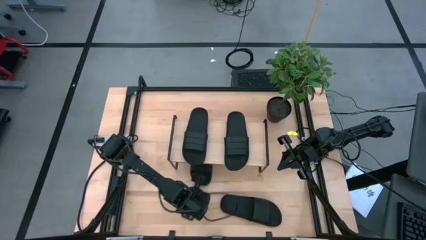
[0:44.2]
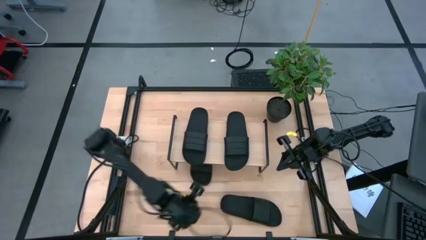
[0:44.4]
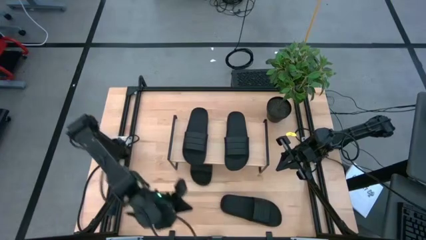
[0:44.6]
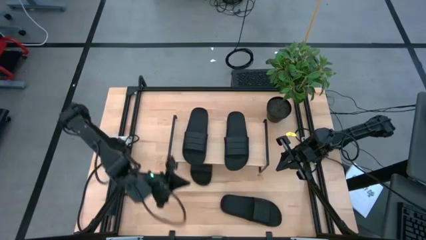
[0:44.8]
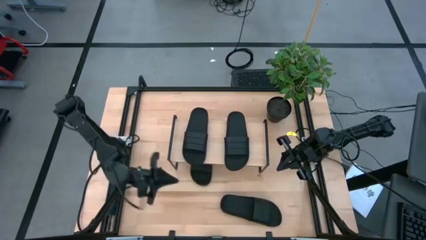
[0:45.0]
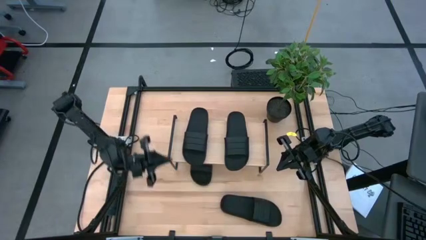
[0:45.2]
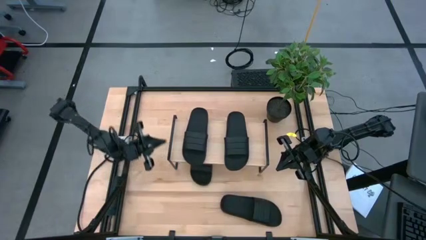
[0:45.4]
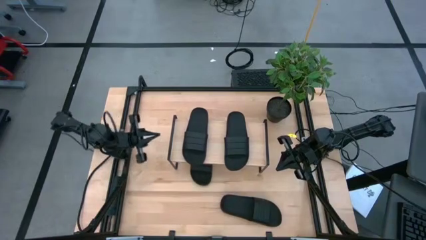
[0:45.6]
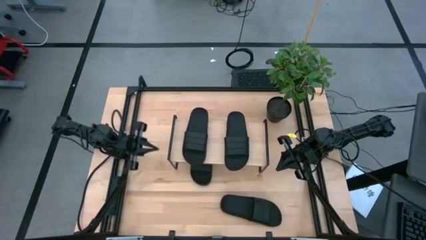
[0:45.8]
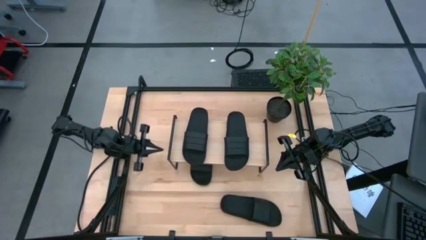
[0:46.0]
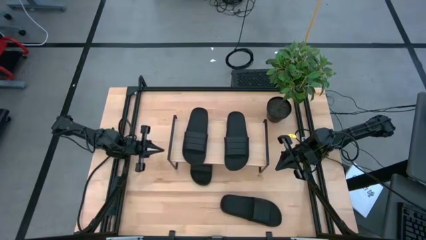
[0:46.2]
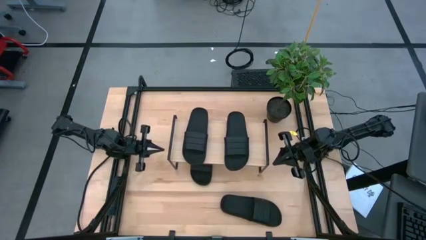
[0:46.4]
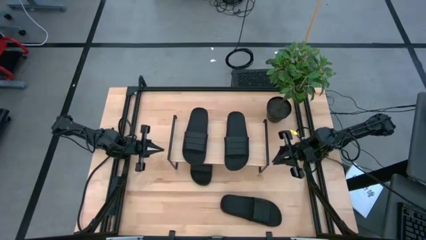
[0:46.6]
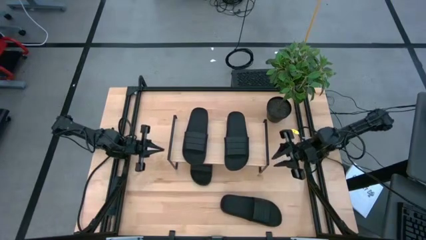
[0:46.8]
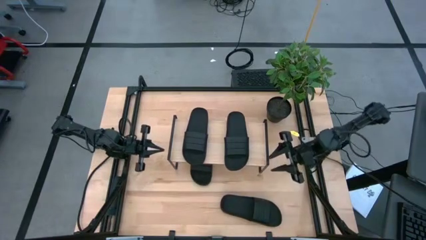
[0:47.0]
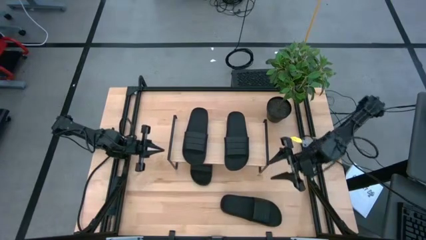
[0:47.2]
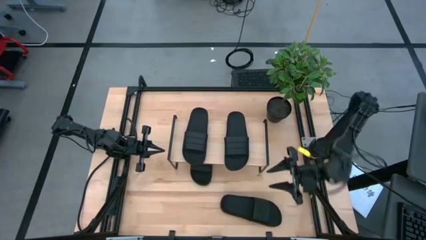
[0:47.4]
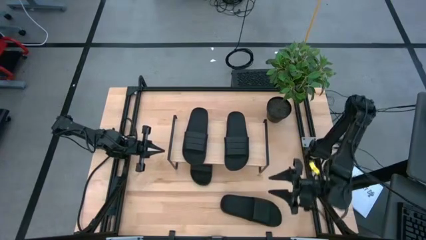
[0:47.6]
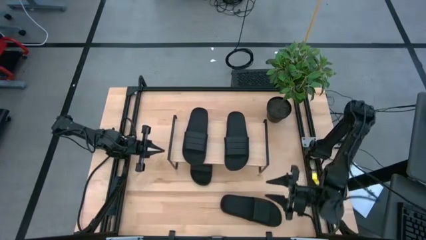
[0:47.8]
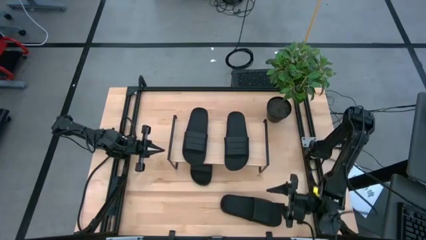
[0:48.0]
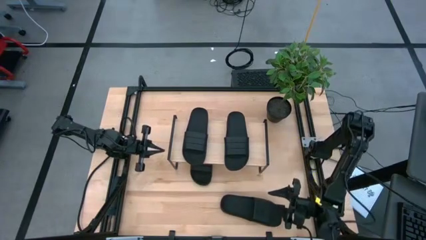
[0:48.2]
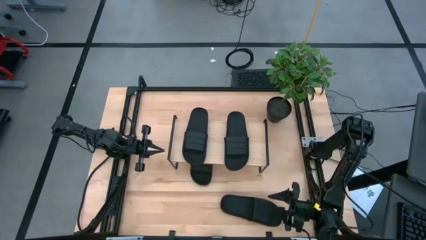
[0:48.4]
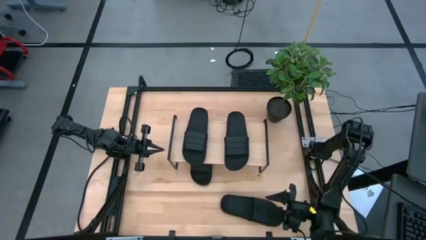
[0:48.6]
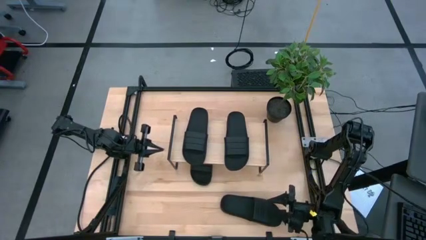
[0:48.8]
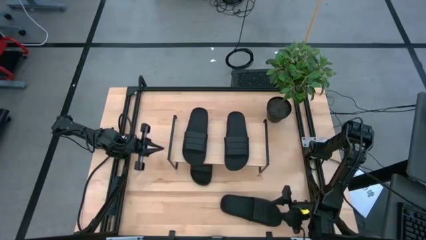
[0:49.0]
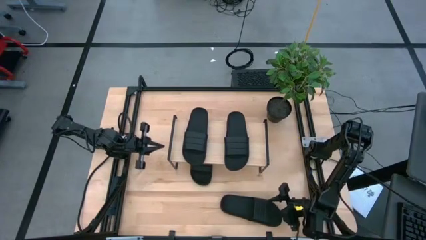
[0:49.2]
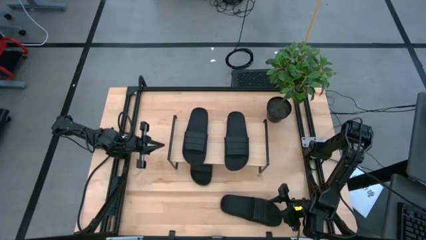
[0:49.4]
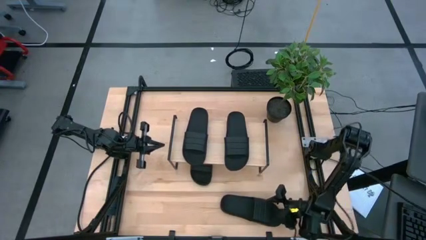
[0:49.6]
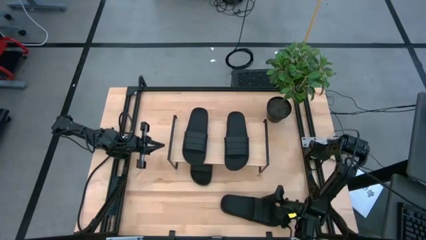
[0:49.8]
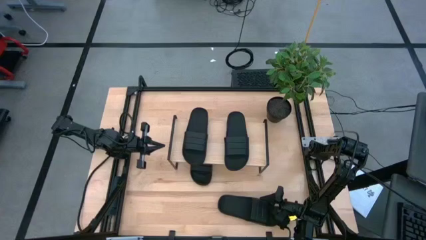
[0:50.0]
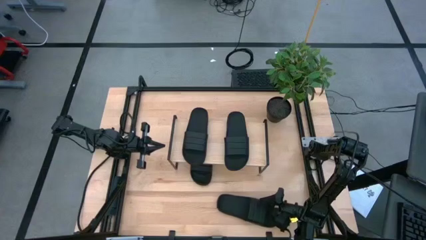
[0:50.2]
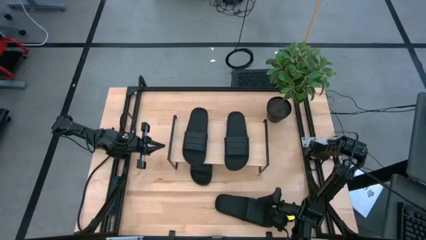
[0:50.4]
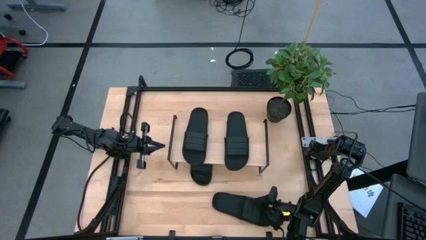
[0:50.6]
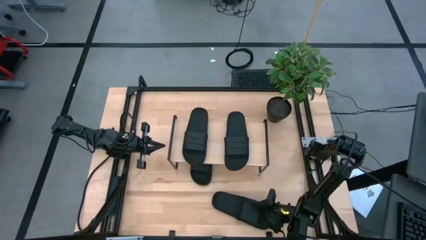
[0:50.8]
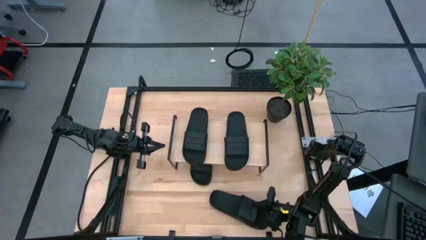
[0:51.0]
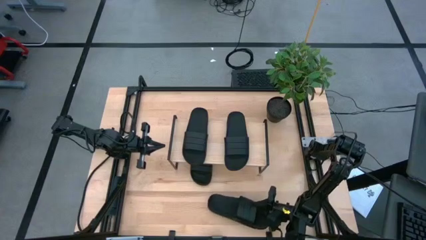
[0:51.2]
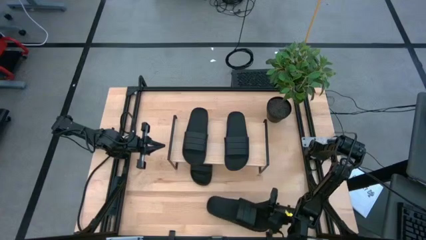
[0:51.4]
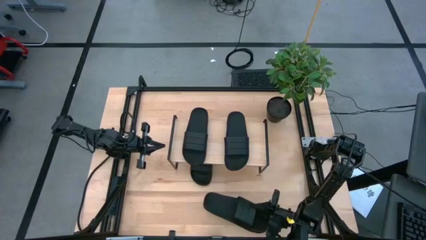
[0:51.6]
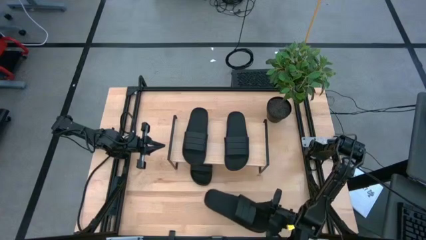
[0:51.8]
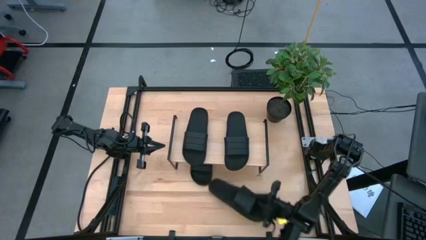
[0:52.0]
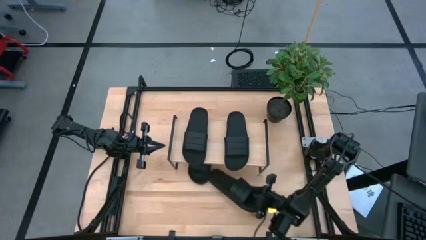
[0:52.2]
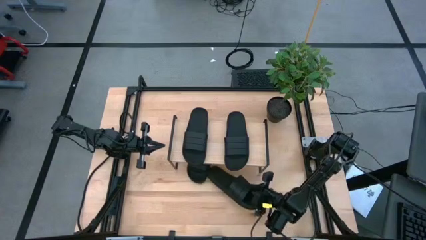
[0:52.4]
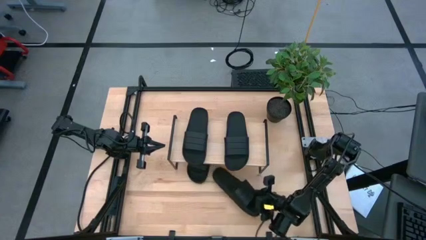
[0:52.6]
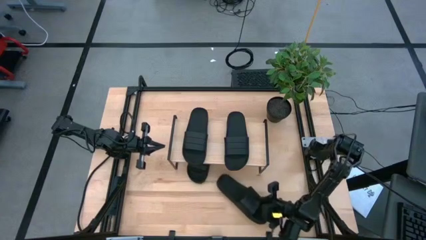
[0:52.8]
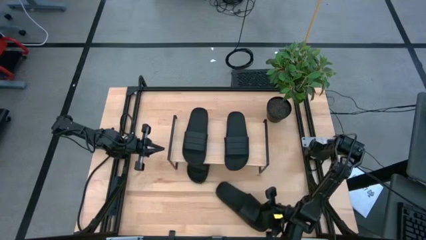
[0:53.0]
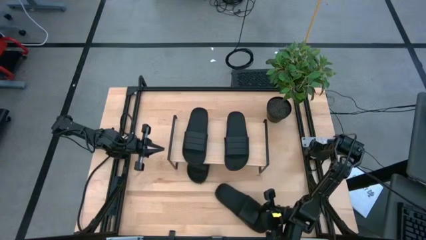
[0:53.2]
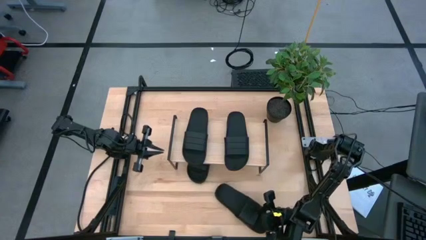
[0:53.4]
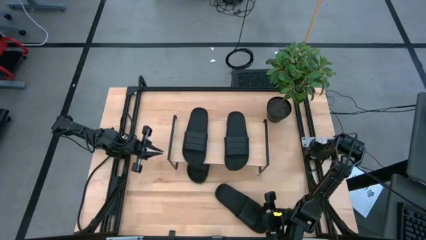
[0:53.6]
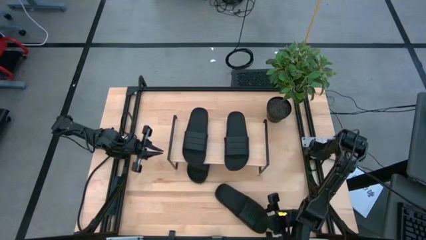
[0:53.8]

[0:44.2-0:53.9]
Task: Pick and place slides into the shelf
Adjust the black slipper

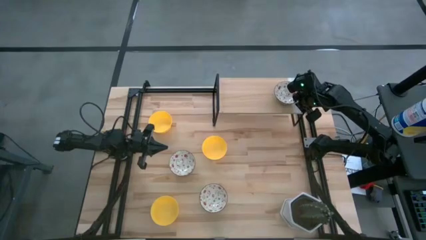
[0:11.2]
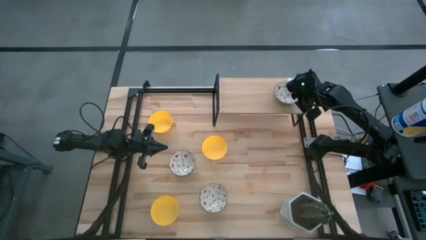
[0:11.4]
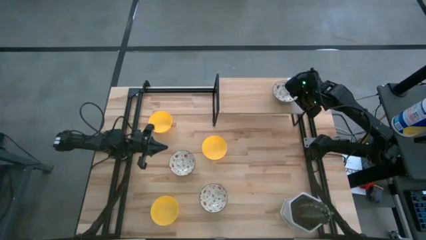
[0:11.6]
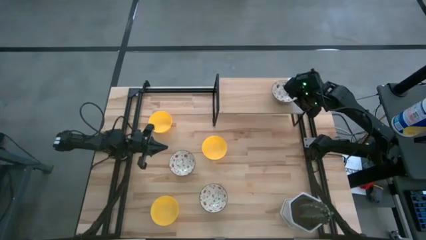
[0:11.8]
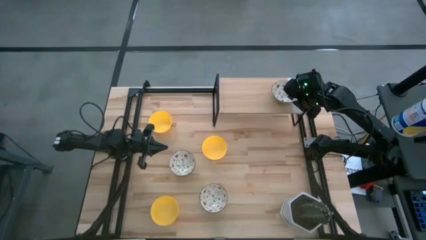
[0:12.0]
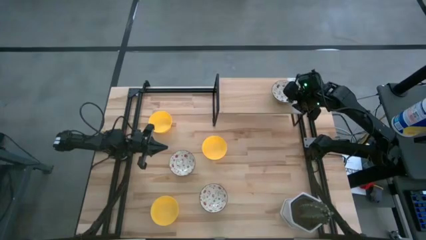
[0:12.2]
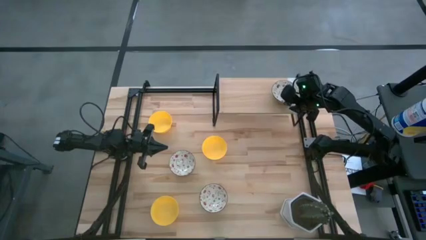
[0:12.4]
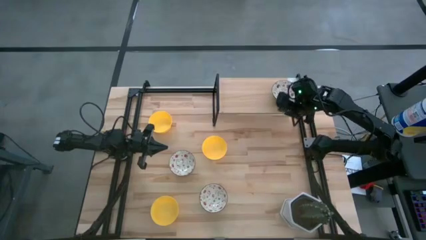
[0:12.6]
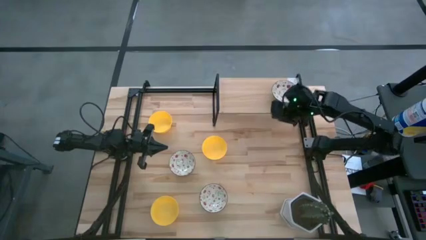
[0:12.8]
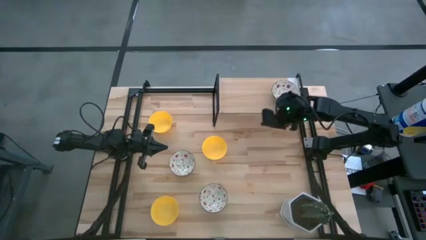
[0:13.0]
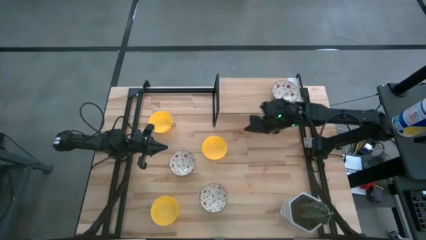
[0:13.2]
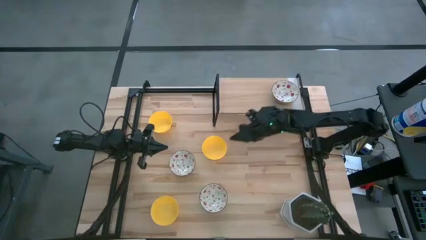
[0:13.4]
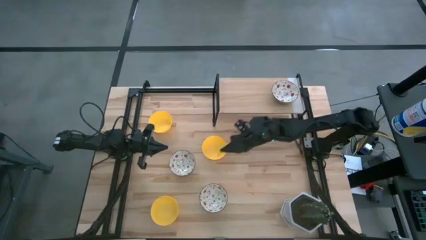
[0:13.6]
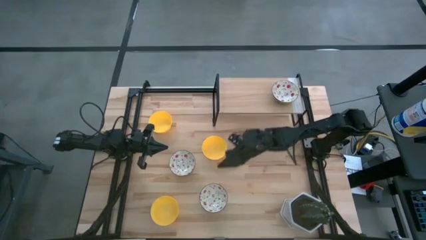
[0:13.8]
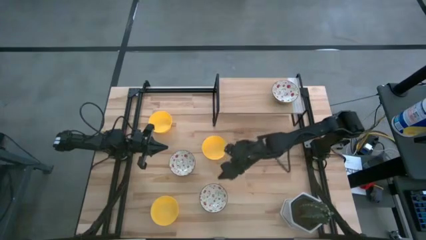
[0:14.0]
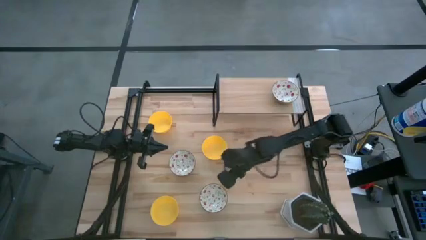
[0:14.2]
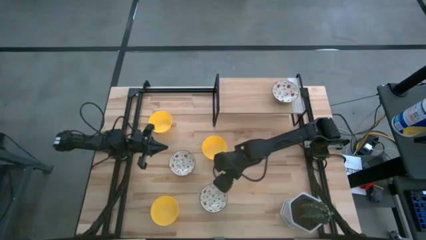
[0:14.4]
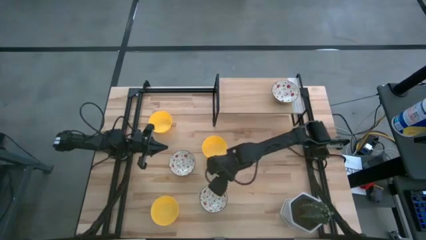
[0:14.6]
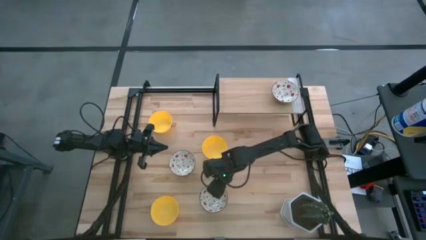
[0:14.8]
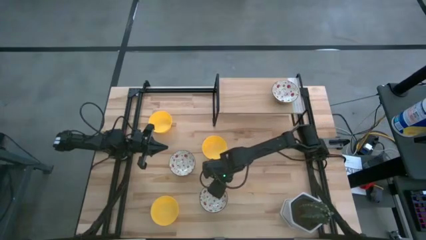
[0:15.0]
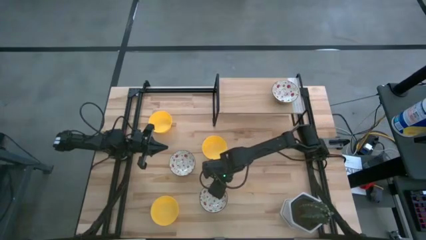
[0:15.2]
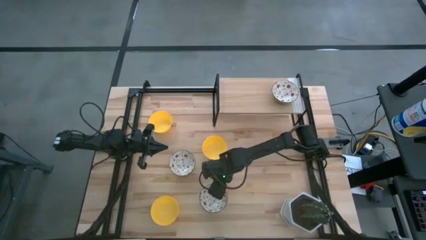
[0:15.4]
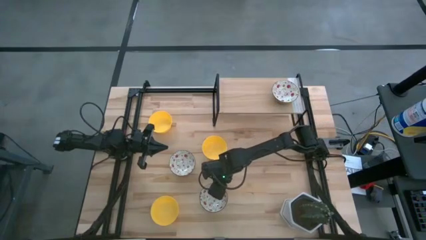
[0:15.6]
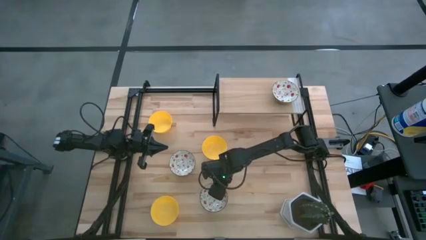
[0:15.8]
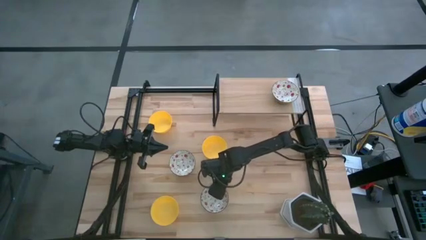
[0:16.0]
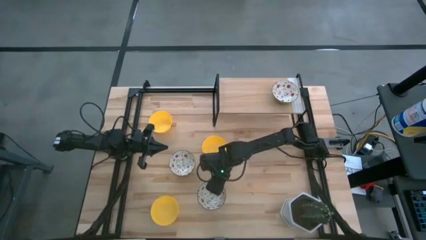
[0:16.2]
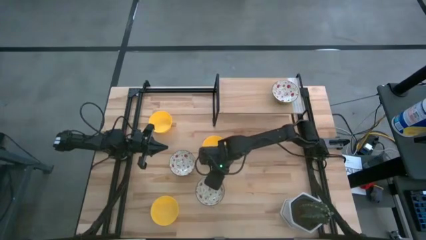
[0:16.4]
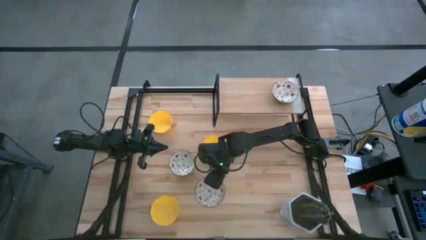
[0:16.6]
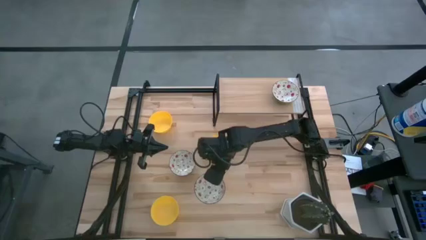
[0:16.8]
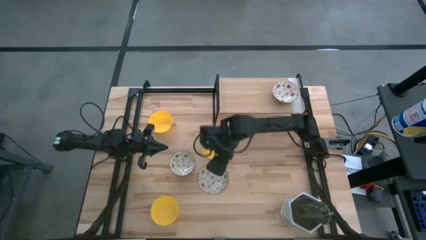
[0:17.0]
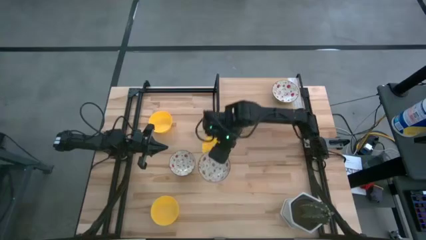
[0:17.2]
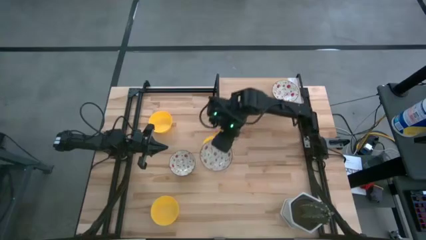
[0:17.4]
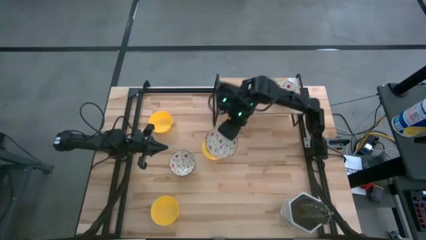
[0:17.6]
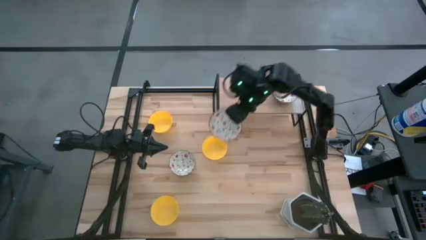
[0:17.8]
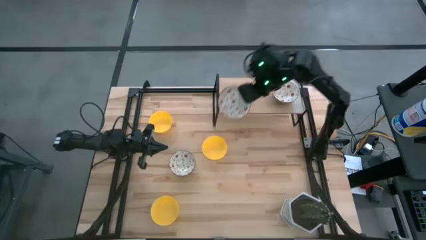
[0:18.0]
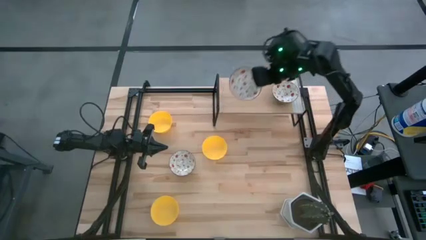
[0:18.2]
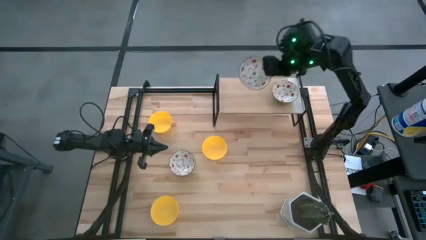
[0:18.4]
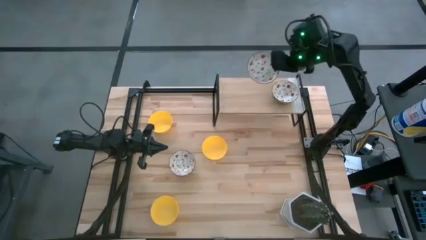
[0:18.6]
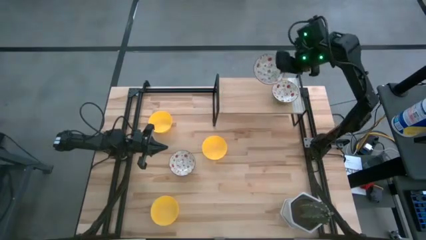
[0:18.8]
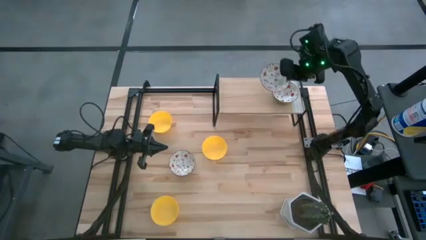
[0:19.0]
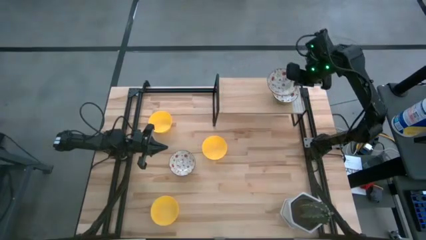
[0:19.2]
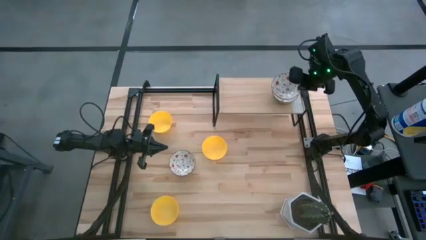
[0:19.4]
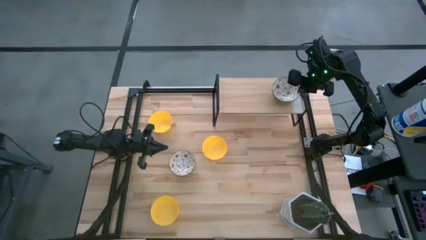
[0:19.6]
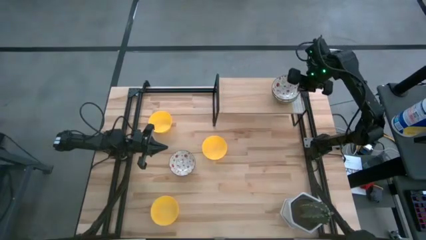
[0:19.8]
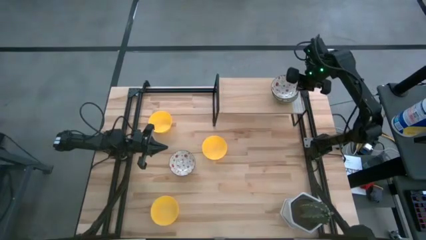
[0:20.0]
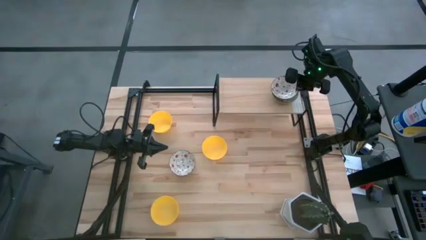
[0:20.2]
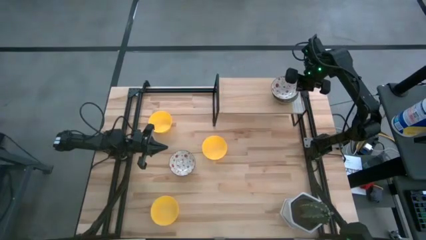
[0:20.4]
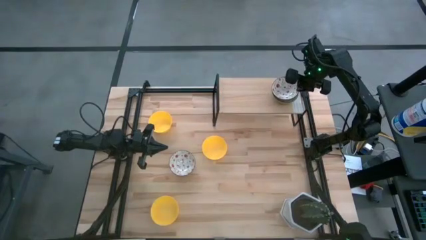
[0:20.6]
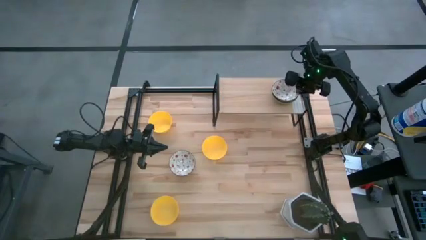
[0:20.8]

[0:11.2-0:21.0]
Task: Pick & Place Mini bowls
Stack the bottom white patterned bowl on the white patterned bowl on the shelf
